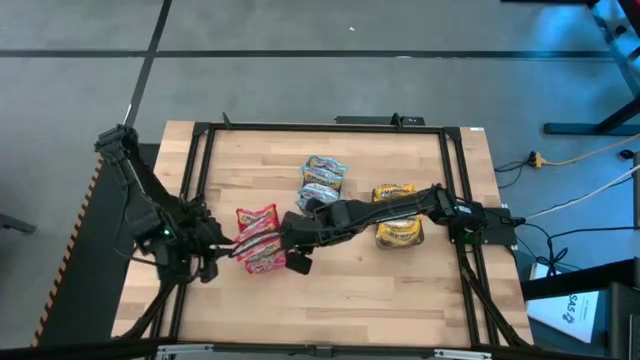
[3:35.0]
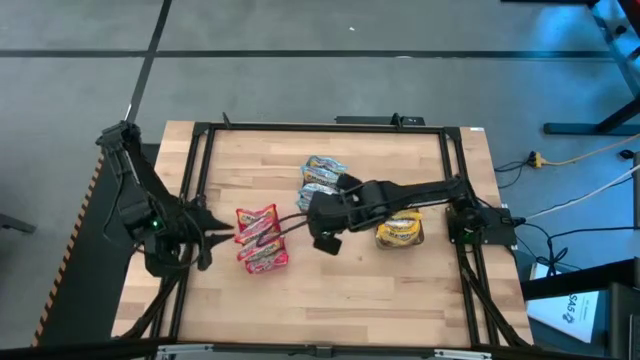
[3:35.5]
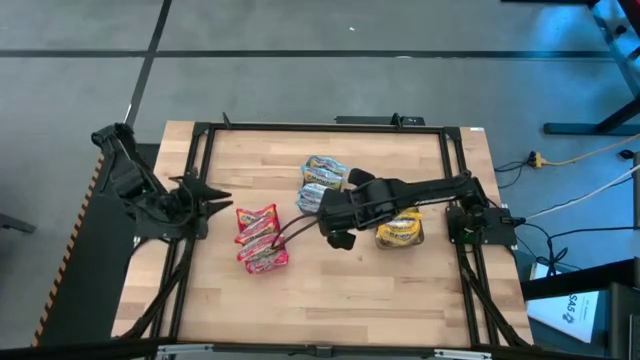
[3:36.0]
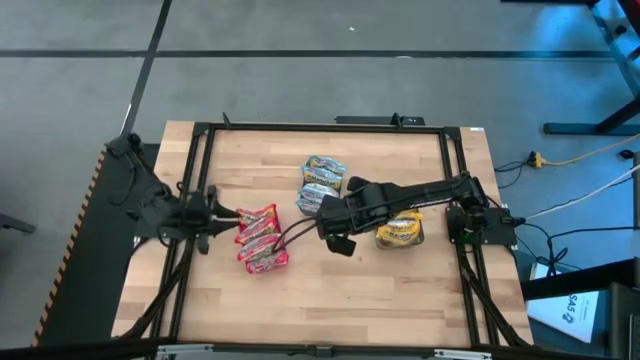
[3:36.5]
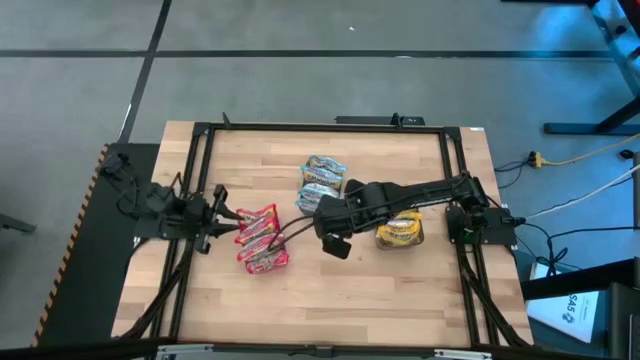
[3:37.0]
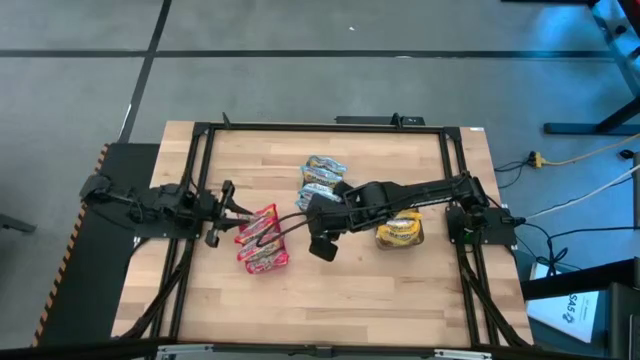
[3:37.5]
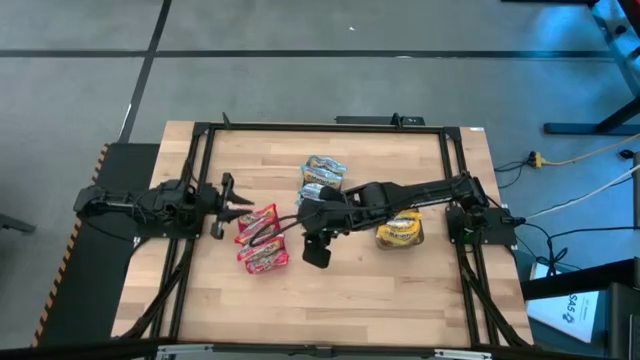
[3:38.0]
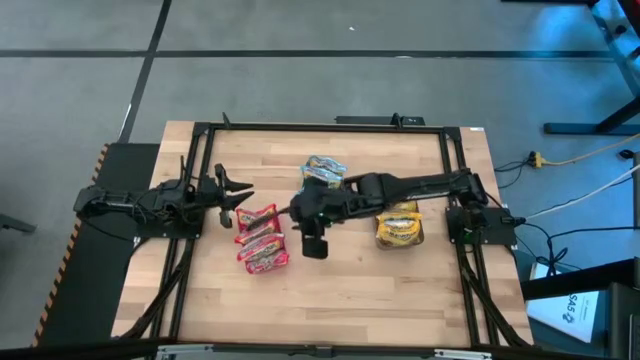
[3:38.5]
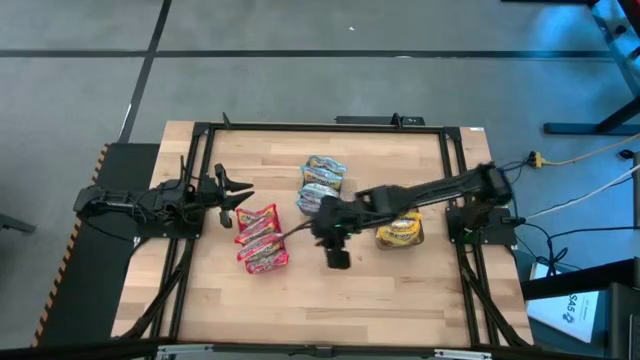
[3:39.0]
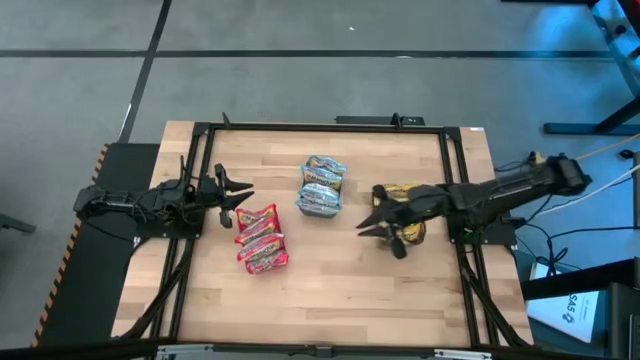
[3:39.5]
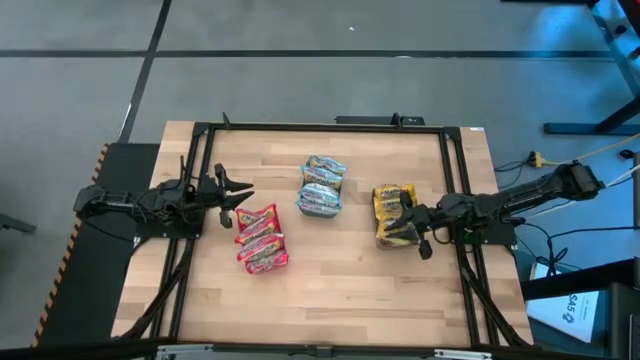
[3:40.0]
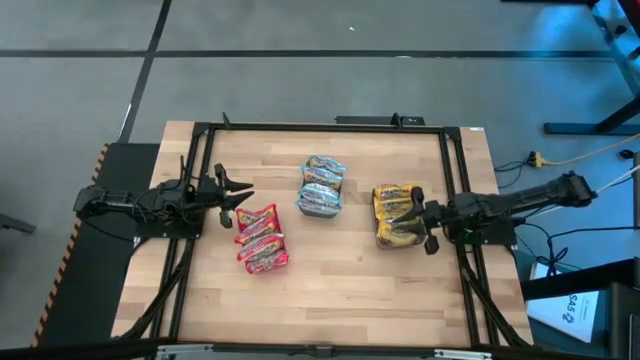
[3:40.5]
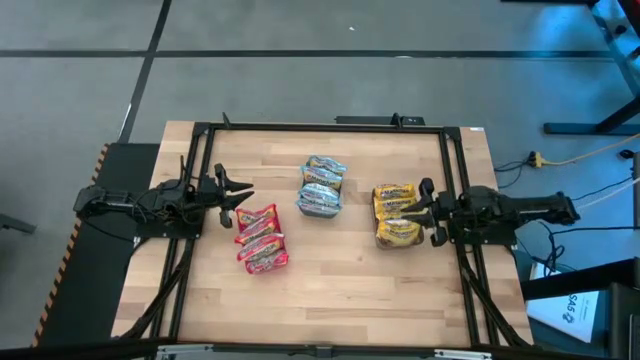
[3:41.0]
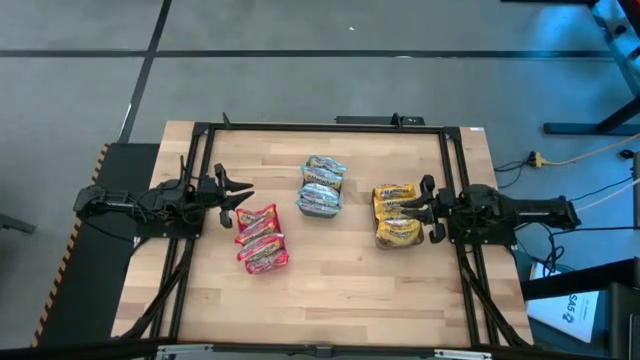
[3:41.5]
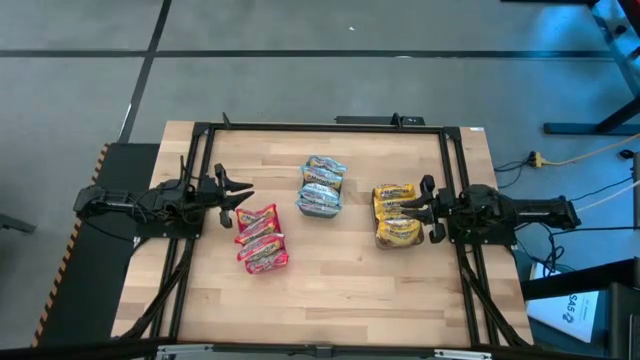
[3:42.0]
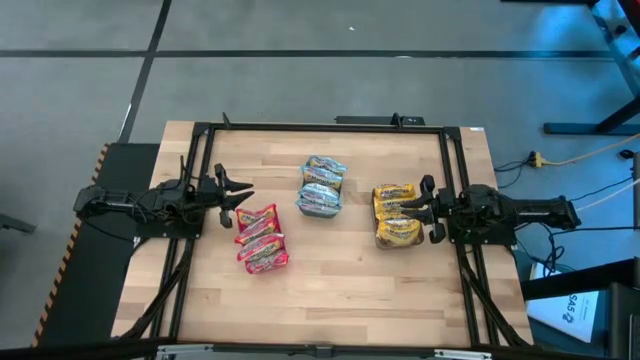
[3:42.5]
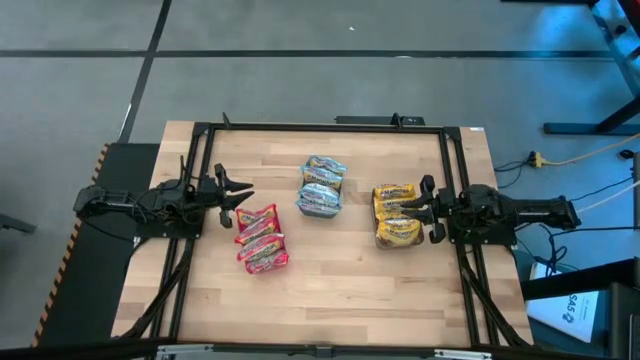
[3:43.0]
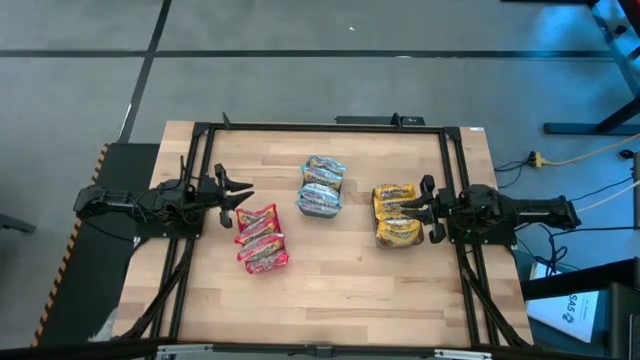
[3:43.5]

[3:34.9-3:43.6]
Task: Sort Maruchan noodles
Return to Home Position

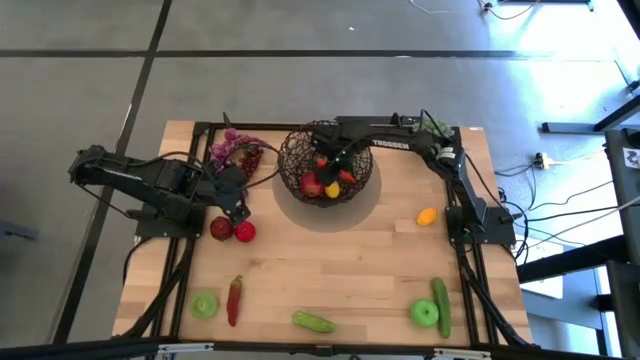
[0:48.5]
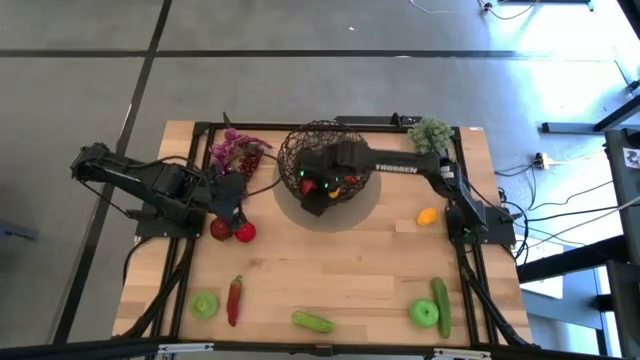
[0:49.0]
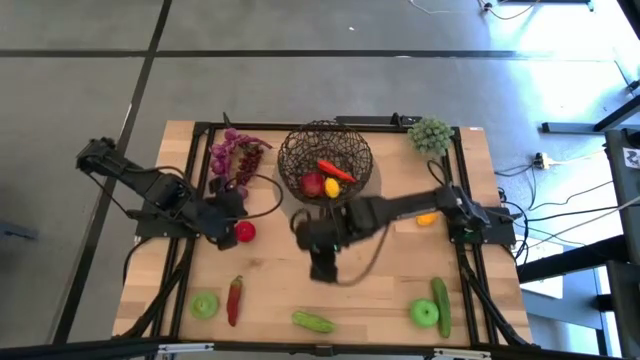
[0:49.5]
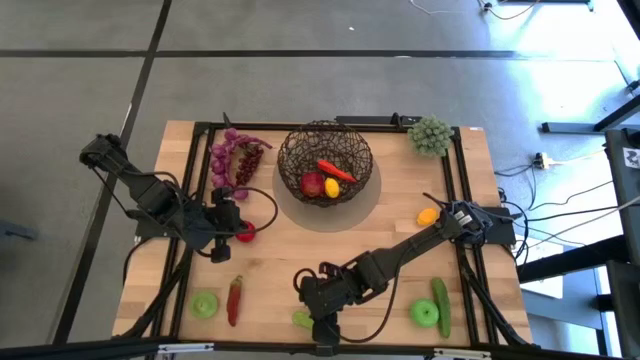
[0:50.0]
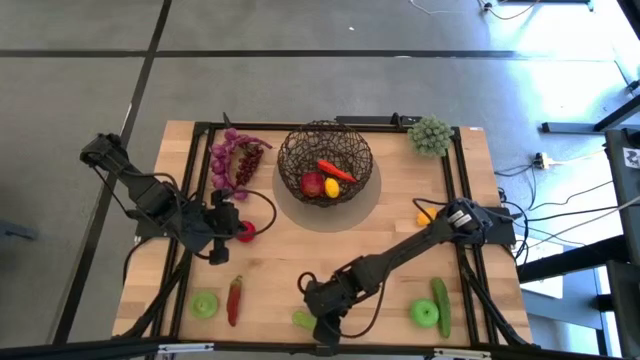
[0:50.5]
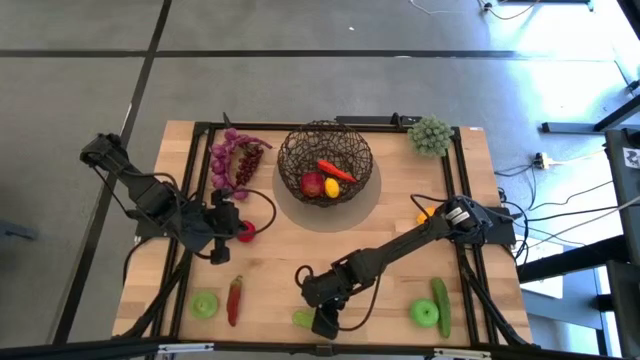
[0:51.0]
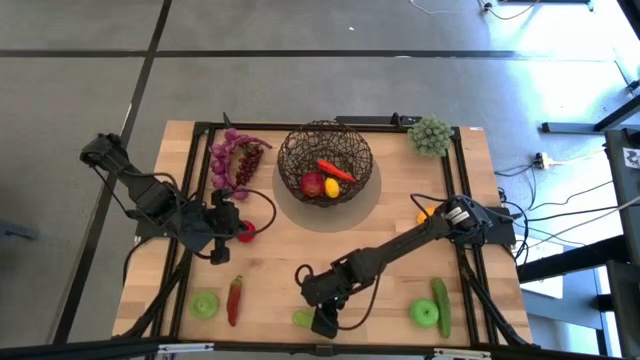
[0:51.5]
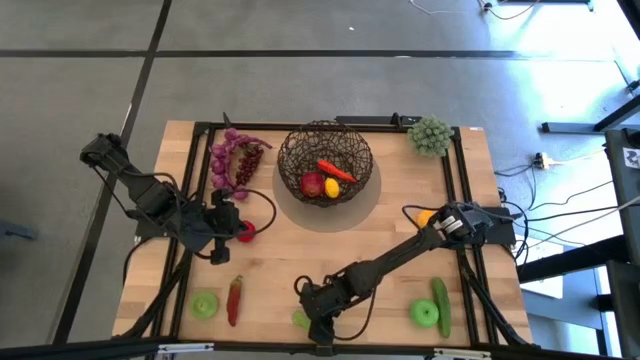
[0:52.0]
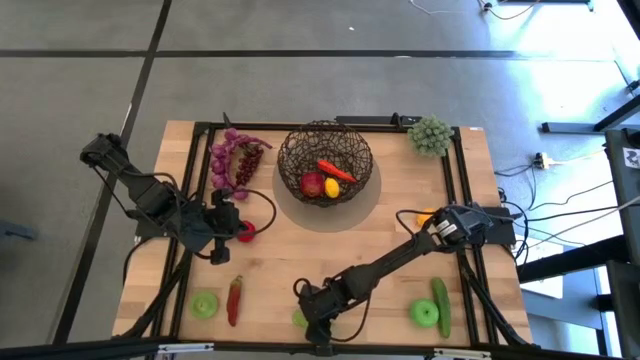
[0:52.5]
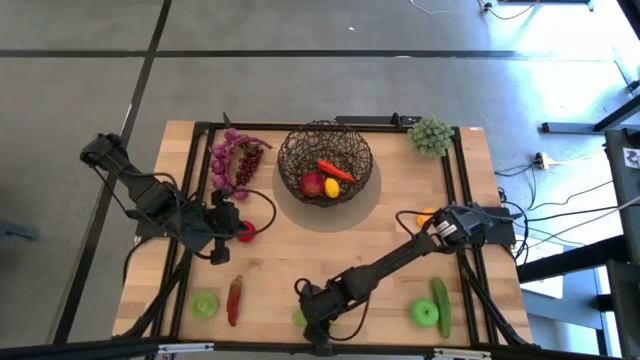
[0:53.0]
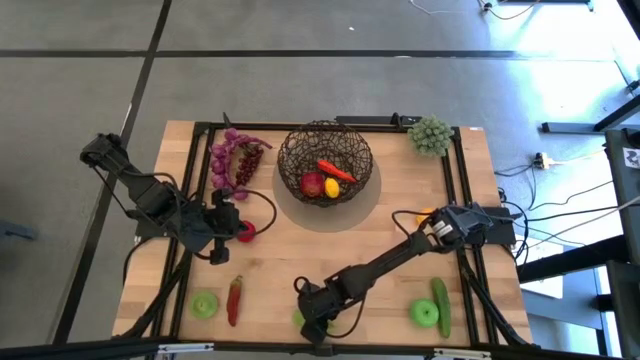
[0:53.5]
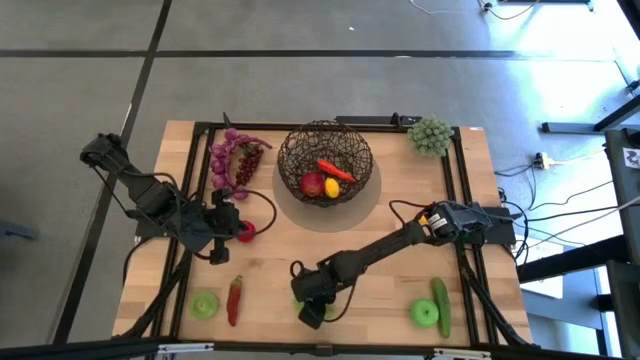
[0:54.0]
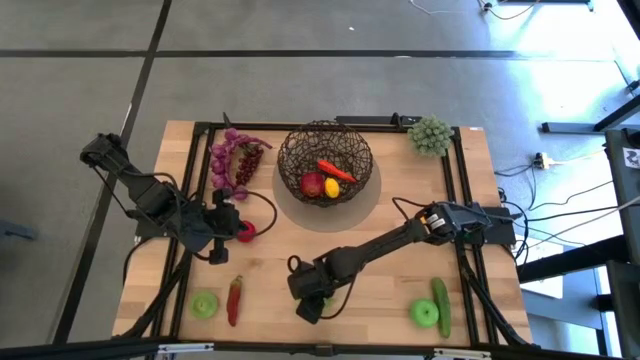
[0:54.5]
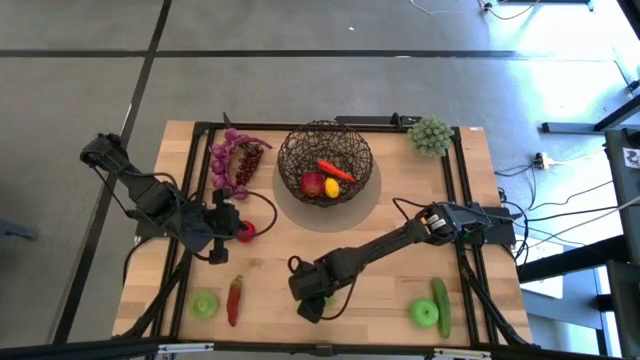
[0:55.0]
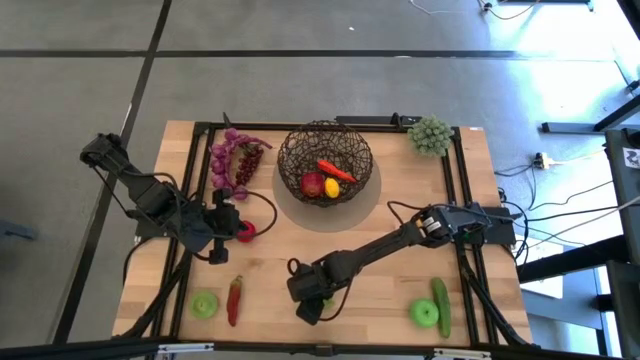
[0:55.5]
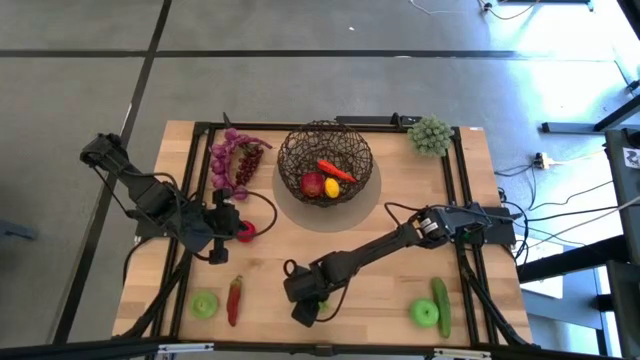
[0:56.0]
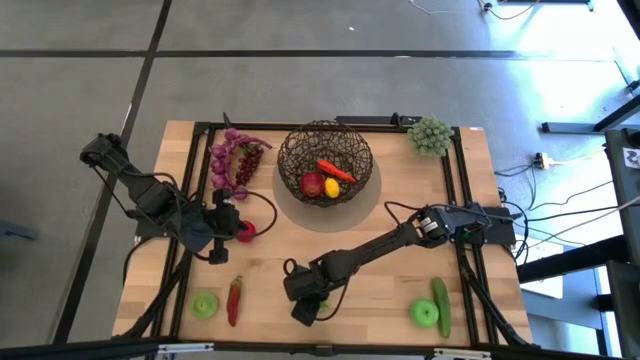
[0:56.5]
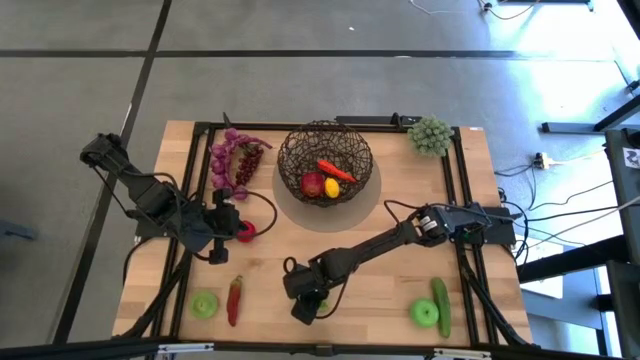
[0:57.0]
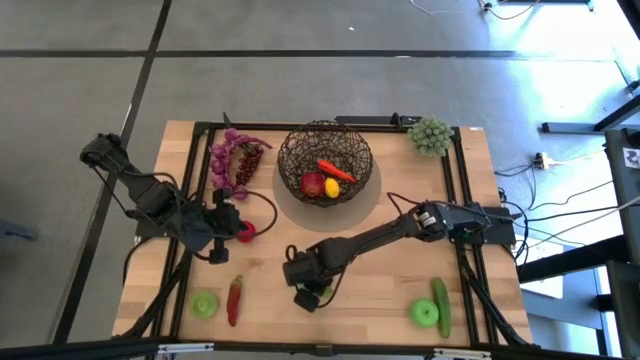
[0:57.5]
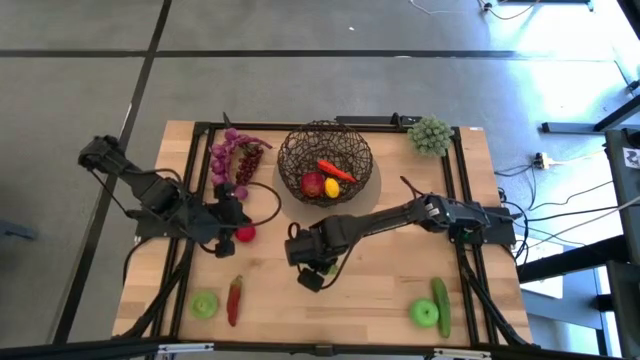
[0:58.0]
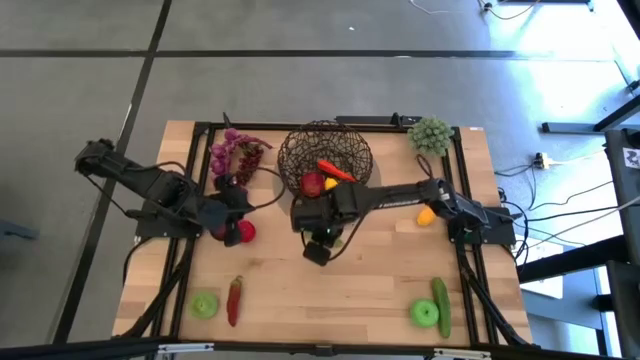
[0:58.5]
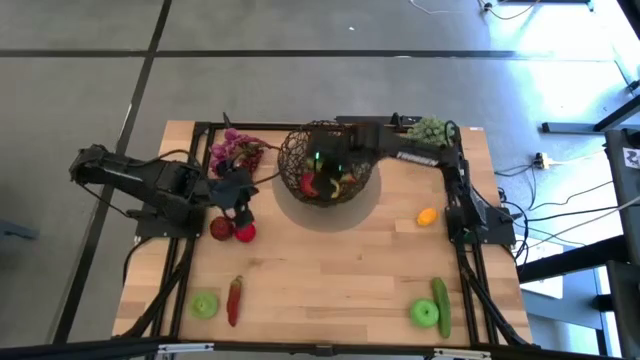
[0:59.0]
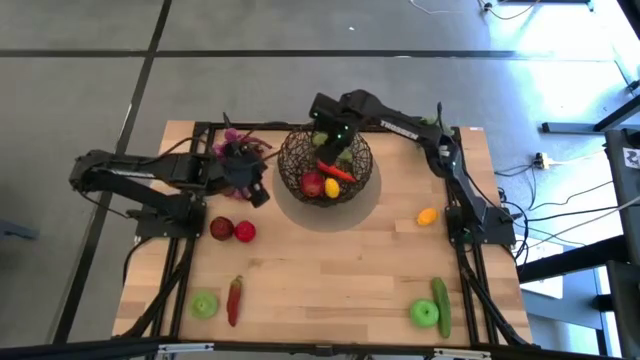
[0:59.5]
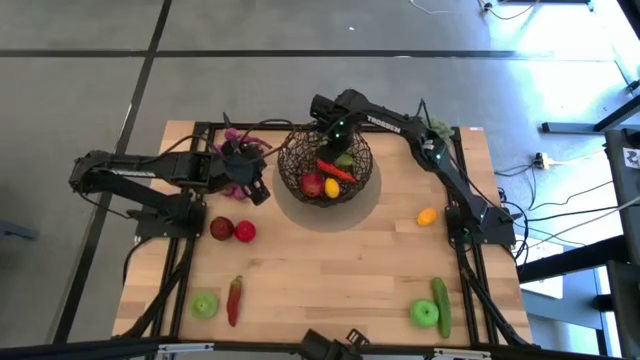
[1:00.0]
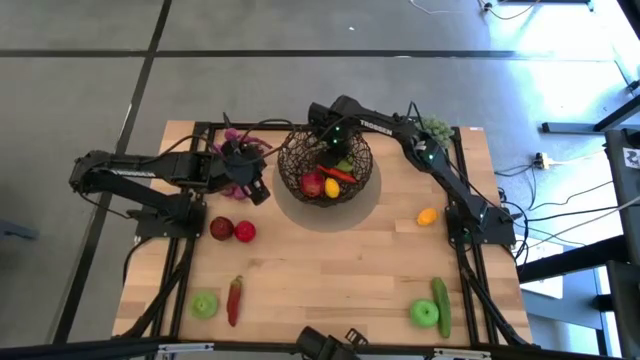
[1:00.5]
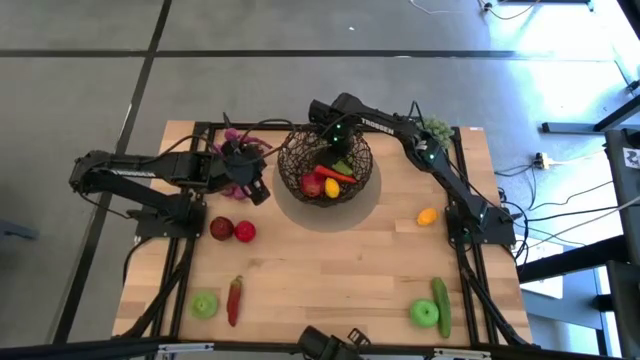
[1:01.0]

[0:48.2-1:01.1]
Task: Build produce basket
Put the left cucumber into the wire basket
